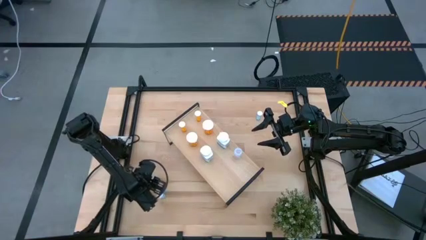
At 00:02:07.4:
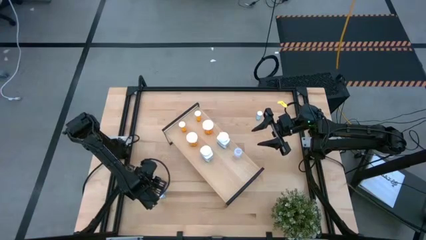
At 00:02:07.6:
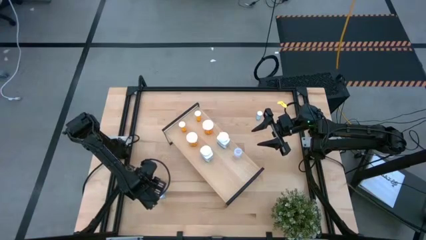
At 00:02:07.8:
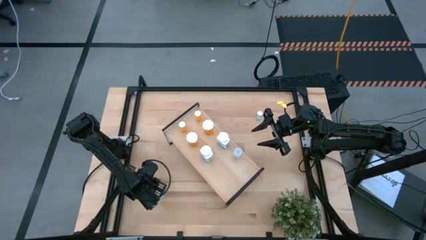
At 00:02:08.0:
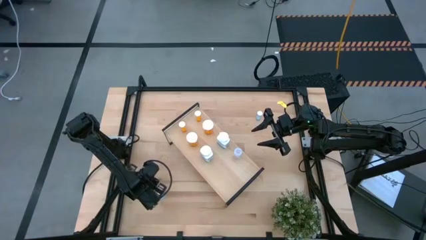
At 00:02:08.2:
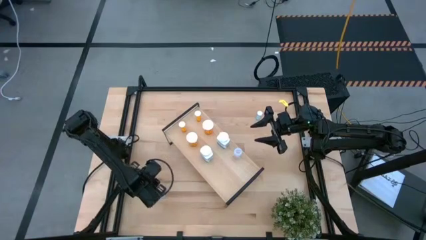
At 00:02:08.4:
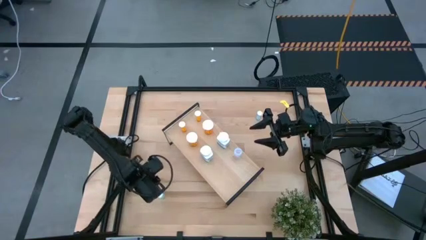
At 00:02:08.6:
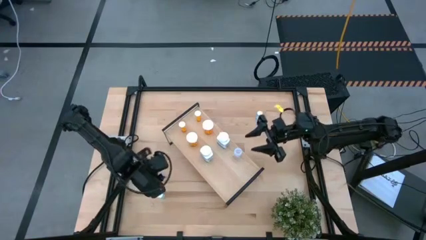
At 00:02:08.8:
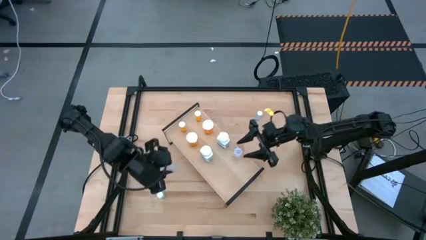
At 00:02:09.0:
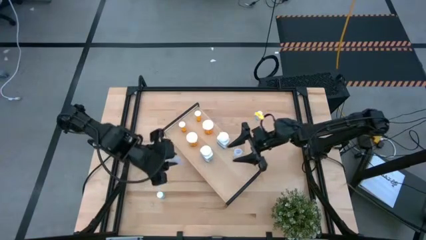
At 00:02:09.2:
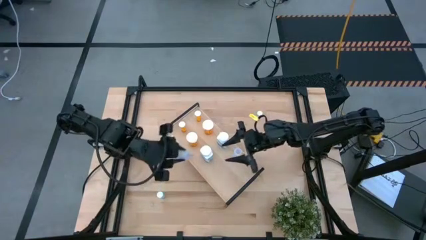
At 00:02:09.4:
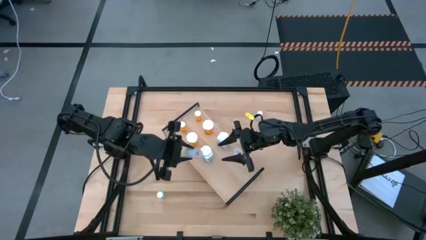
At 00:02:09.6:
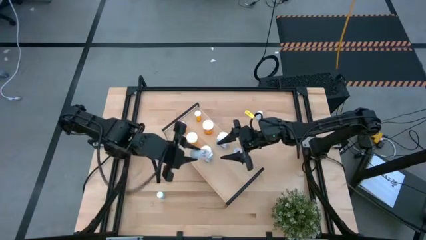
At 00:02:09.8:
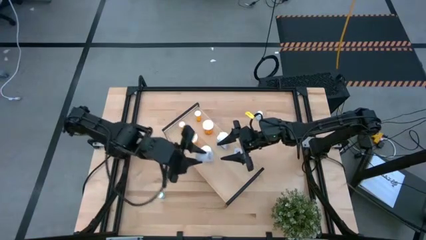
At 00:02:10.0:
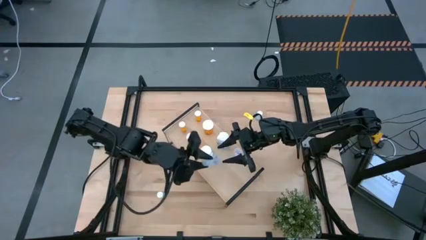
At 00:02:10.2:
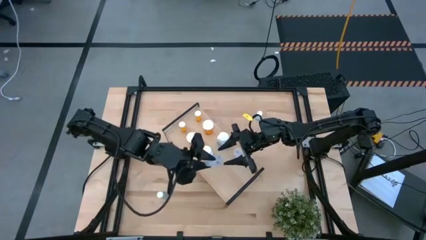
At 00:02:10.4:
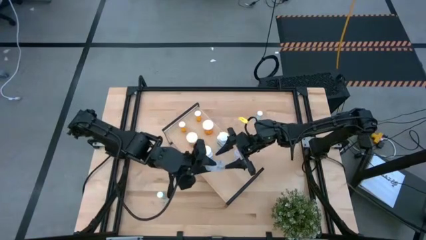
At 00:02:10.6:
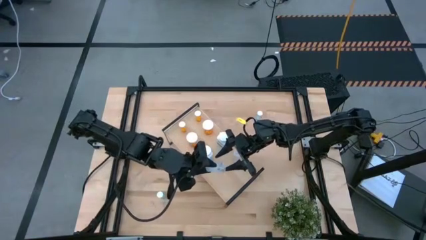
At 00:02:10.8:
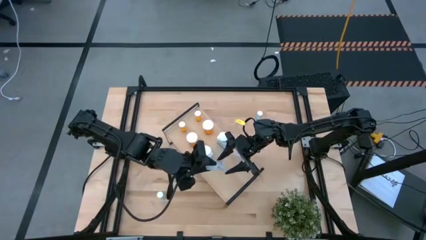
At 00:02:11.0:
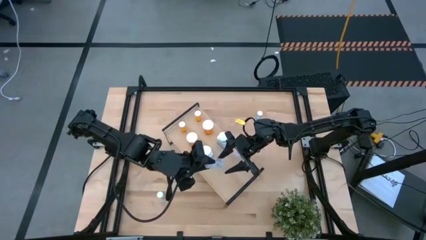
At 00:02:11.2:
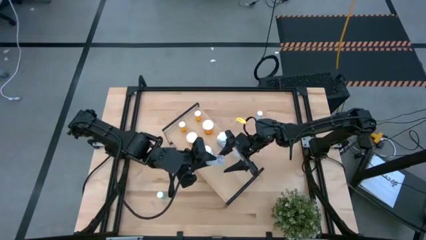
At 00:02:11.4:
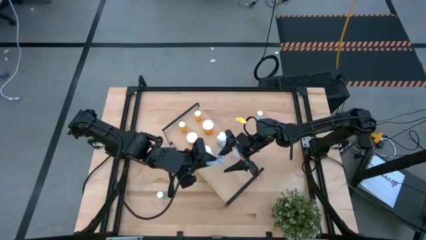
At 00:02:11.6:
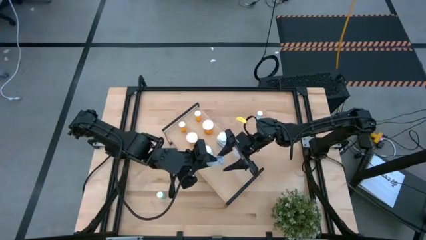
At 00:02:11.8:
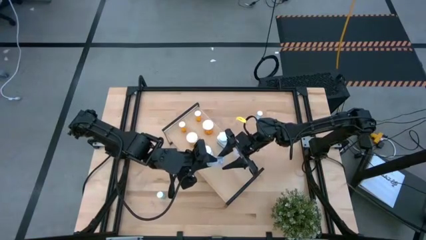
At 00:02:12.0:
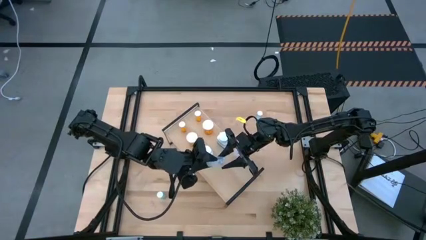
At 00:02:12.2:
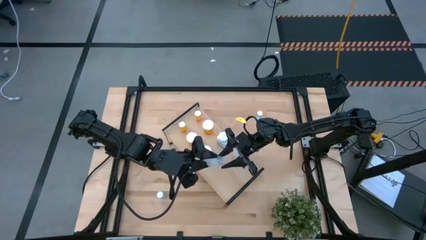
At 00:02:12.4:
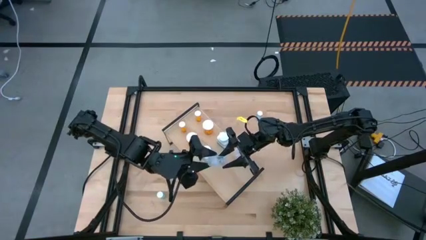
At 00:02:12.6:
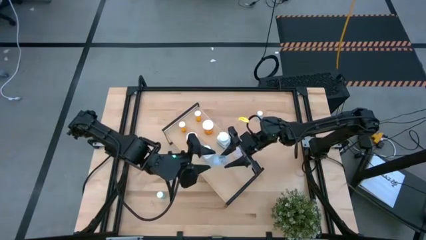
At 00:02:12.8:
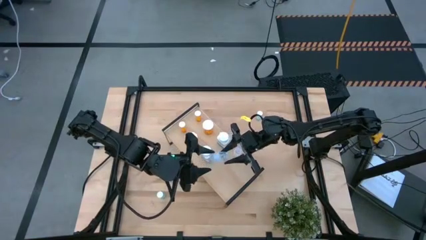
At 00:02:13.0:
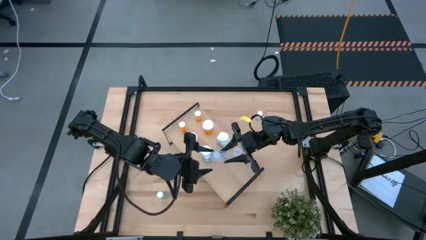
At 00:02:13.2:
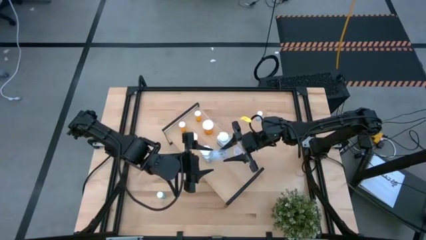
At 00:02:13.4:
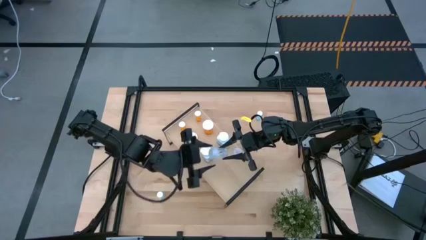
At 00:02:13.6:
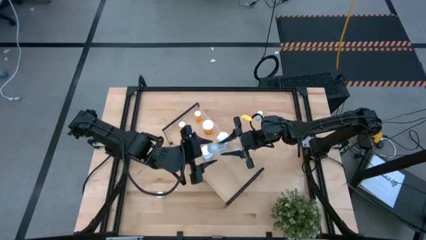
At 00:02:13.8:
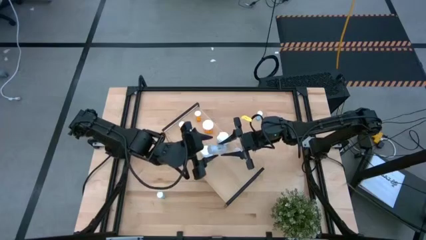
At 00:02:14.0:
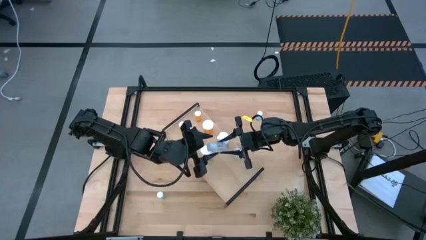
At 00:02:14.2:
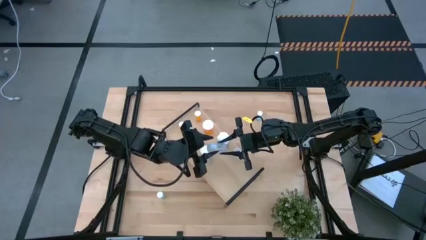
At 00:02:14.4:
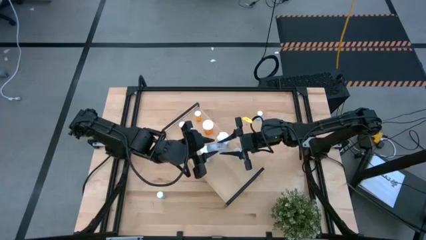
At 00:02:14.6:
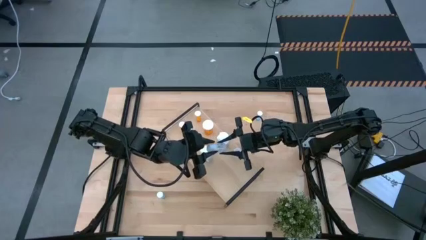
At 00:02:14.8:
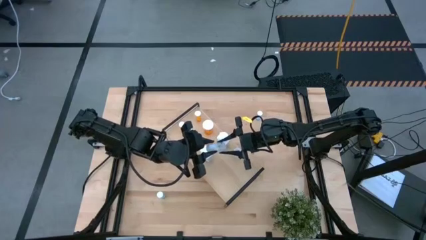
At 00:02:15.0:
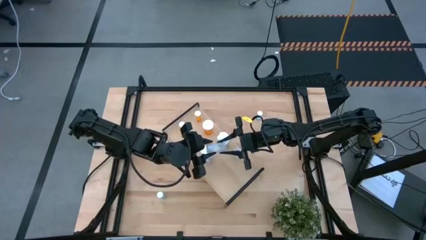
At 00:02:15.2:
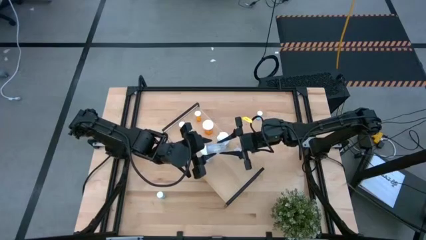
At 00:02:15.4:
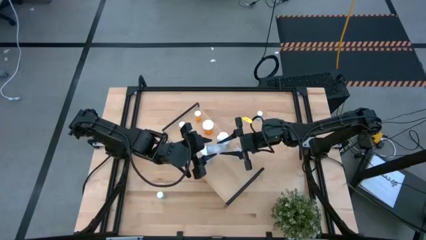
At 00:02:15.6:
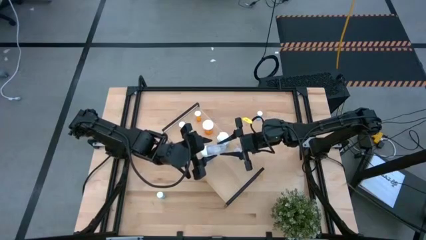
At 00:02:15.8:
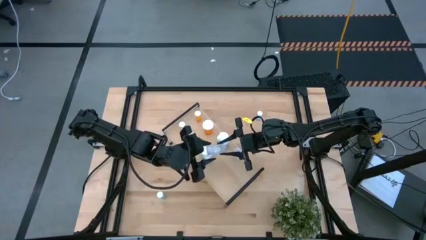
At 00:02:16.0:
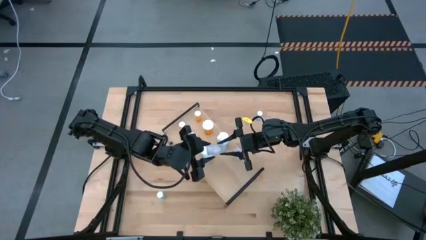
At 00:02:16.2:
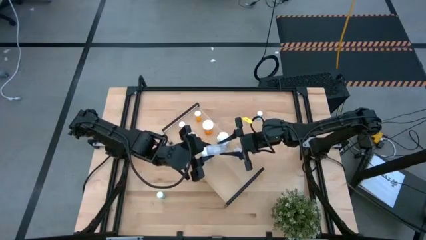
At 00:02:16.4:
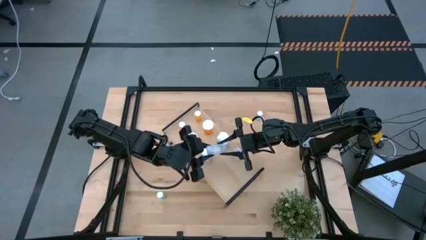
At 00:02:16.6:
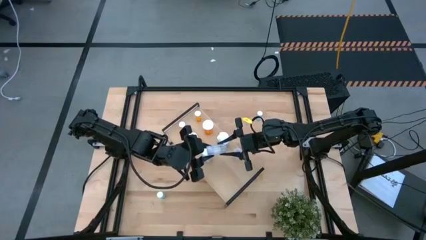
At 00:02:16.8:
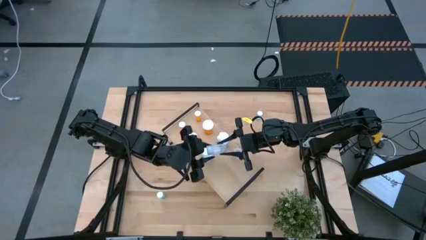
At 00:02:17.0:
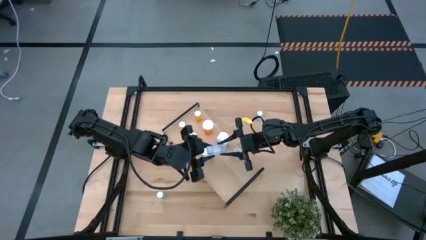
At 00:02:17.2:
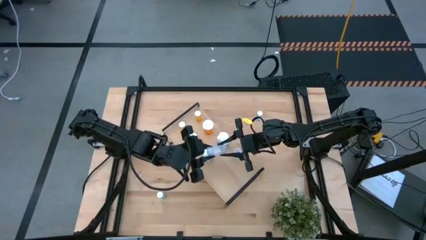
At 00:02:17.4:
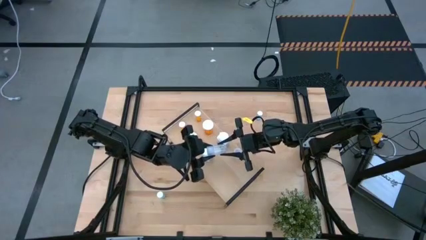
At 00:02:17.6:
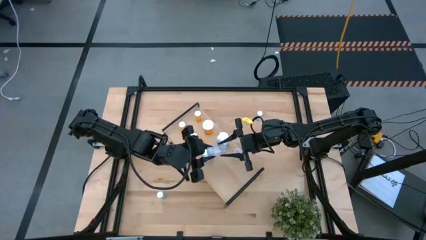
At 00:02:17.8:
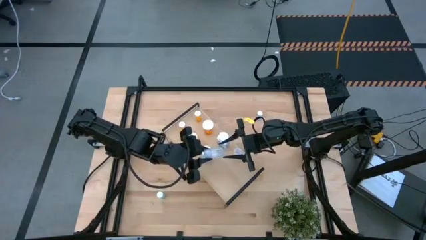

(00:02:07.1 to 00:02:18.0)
Task: Pick and place medicine bottles onto shelf by color
Put the transparent pill bottle on the shelf aligned with the transparent pill bottle
